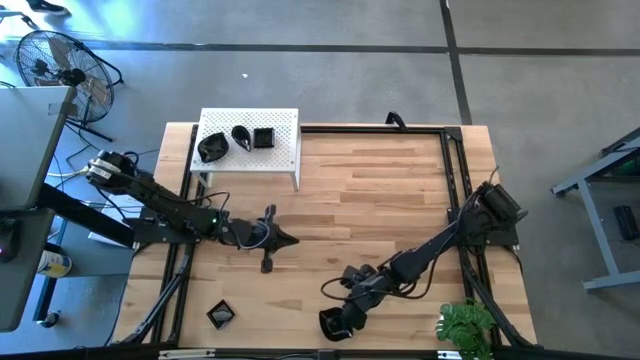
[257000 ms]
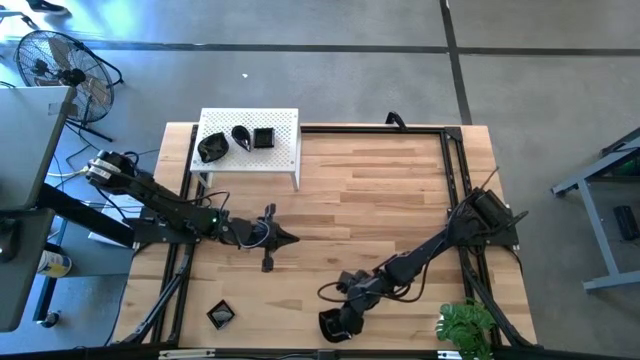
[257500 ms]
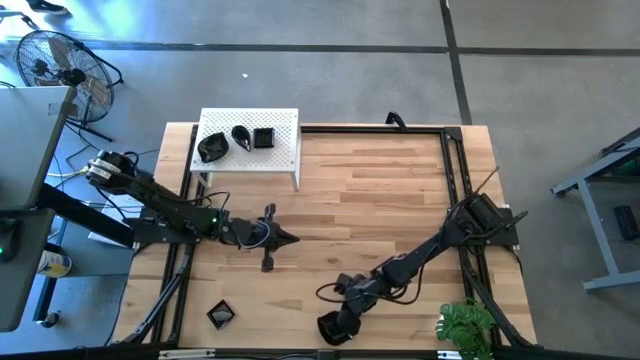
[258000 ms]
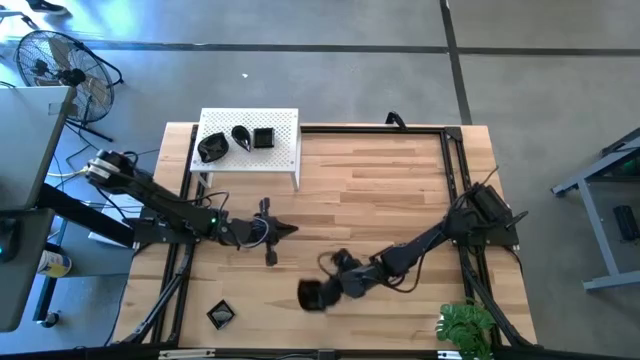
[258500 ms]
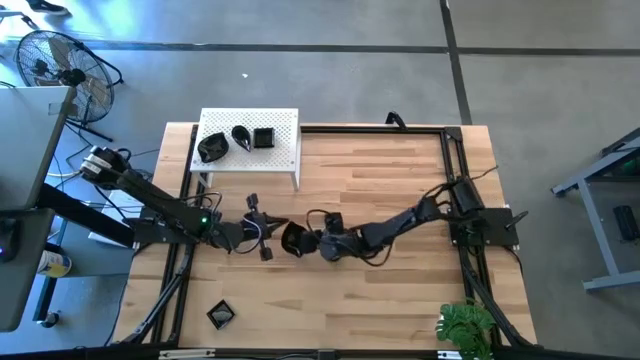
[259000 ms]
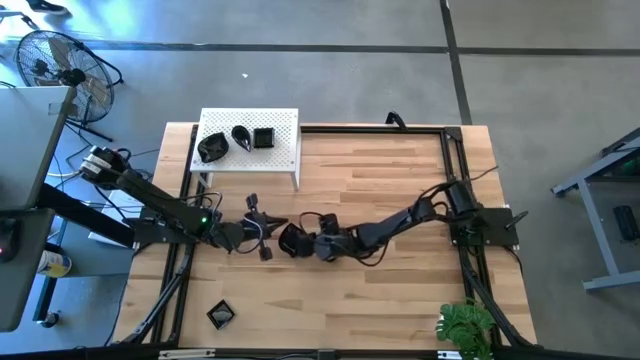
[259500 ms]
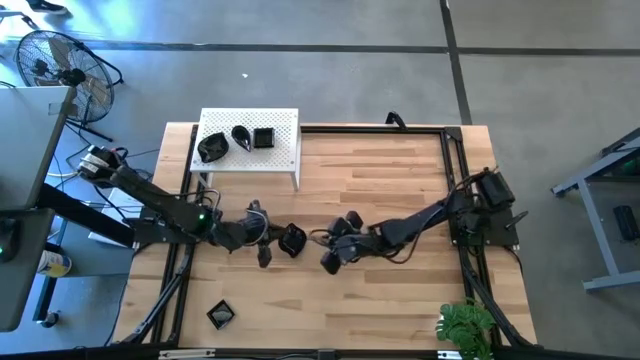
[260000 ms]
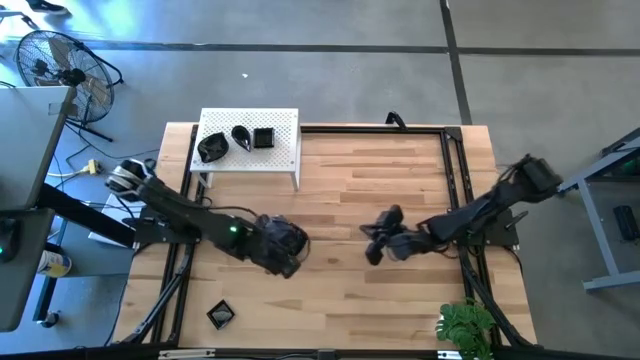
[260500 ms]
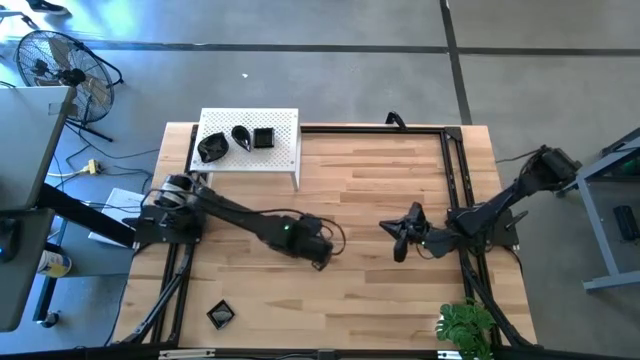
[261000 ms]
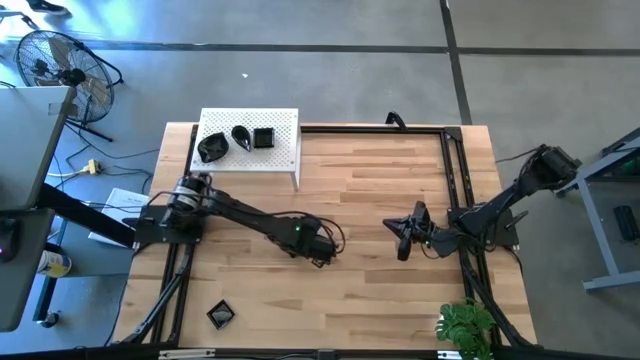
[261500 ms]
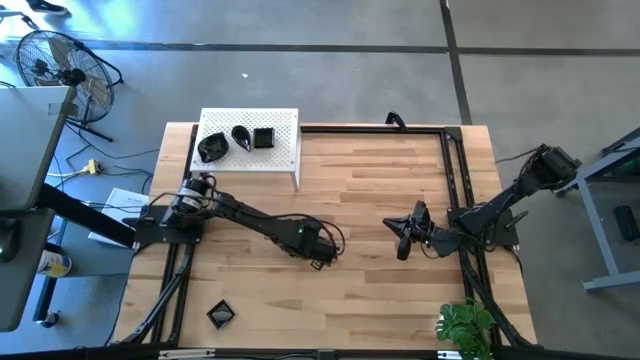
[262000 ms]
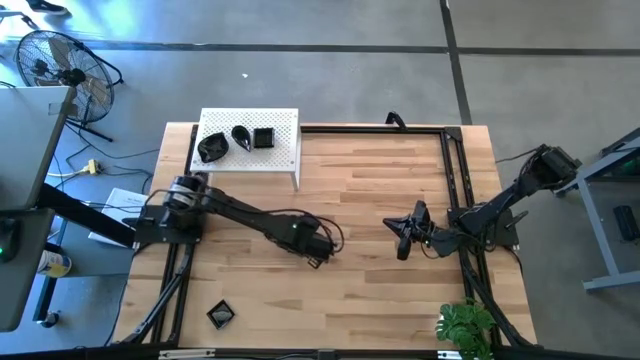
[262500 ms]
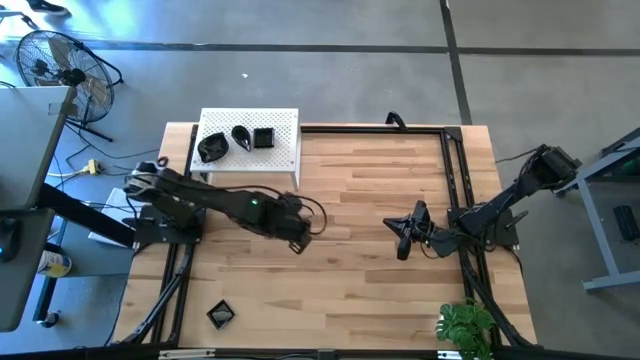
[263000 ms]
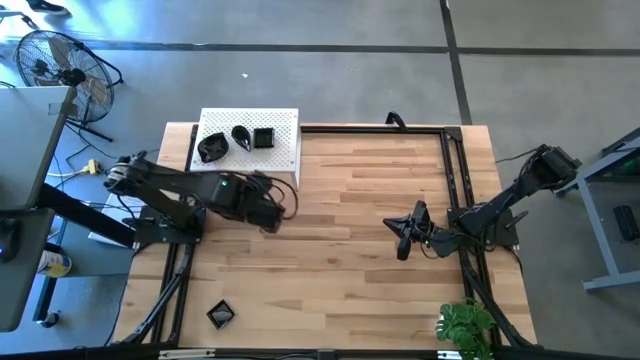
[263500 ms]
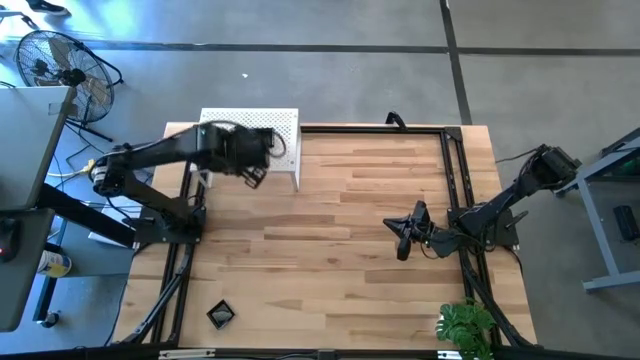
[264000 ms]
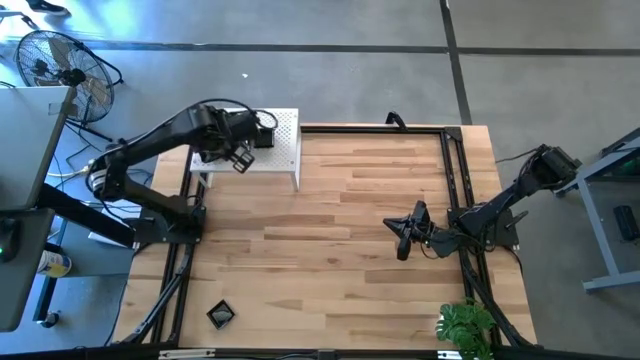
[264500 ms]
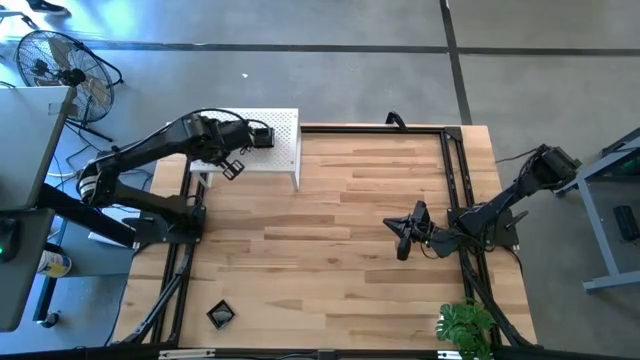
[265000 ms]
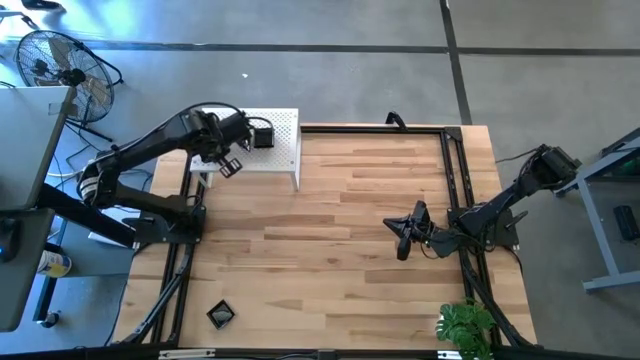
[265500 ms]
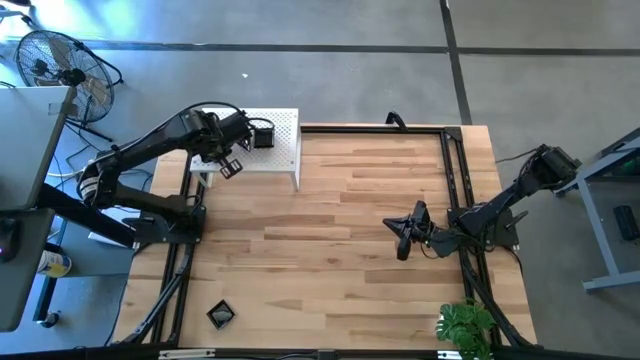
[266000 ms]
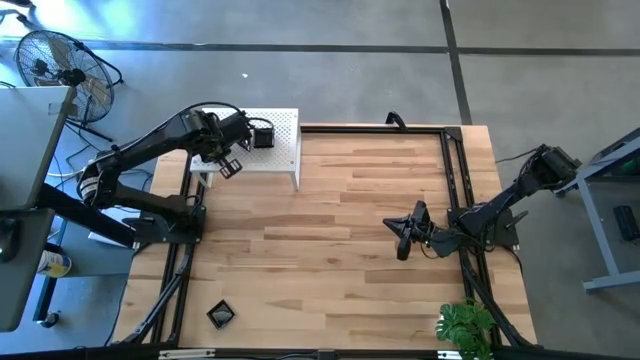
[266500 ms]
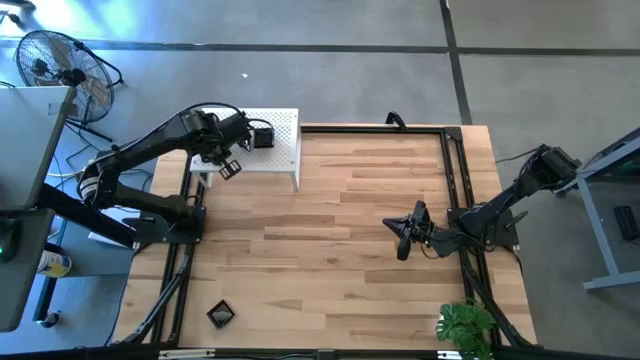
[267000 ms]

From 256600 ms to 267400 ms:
Task: Pick & Place Mini shaped plates
Stack the black leaf shaped plate on top of the stacked black leaf shaped plates on the shelf

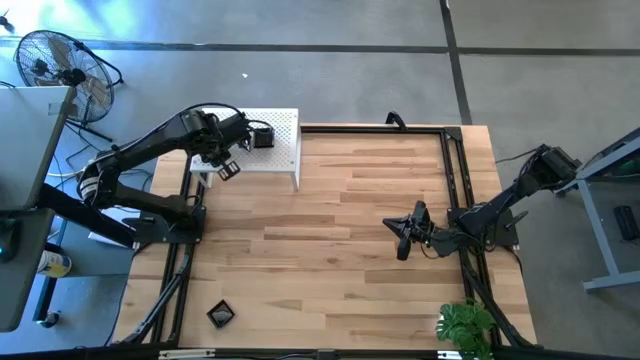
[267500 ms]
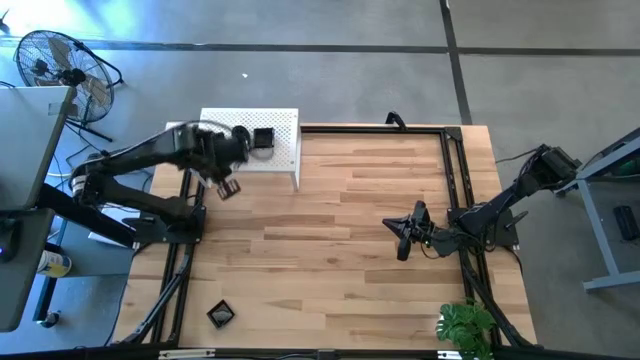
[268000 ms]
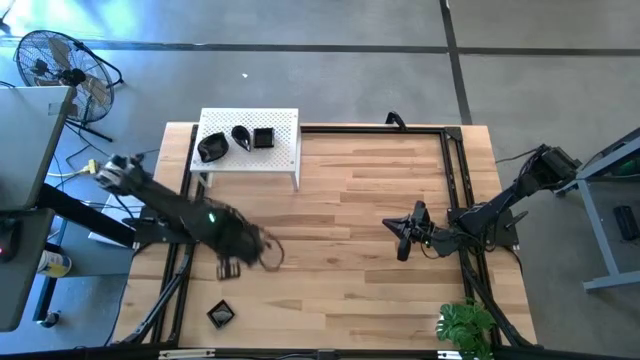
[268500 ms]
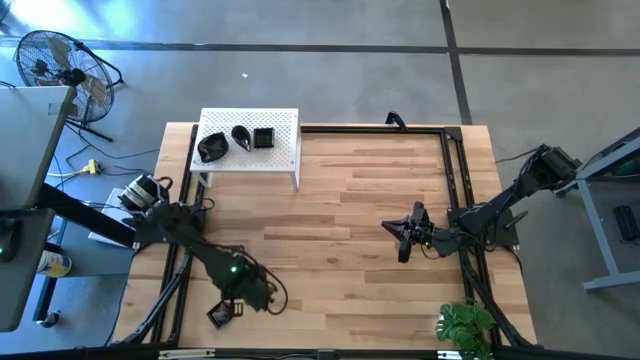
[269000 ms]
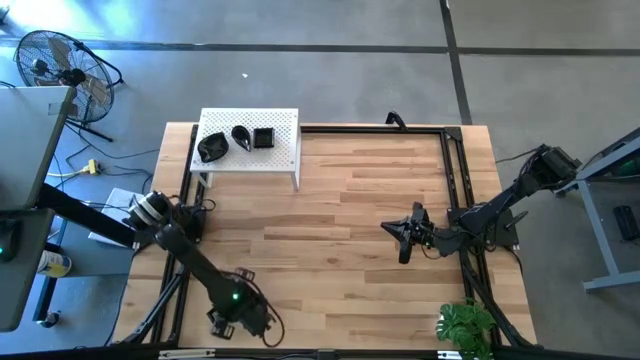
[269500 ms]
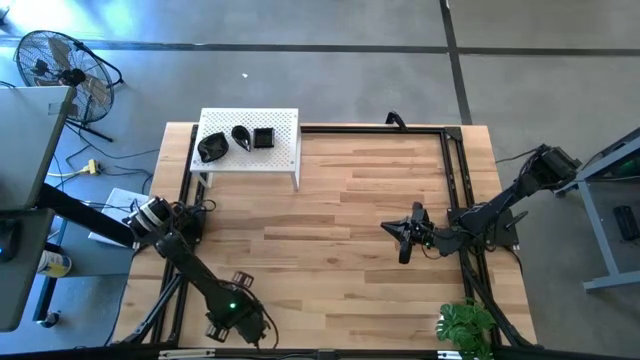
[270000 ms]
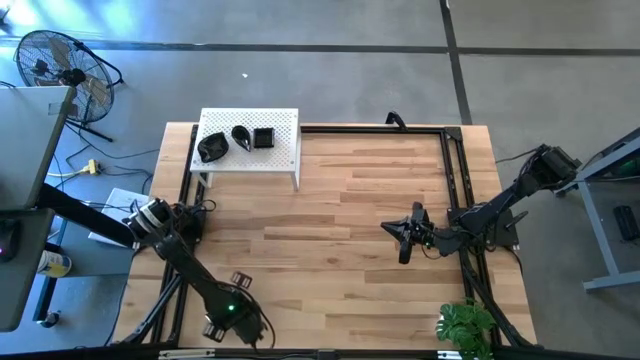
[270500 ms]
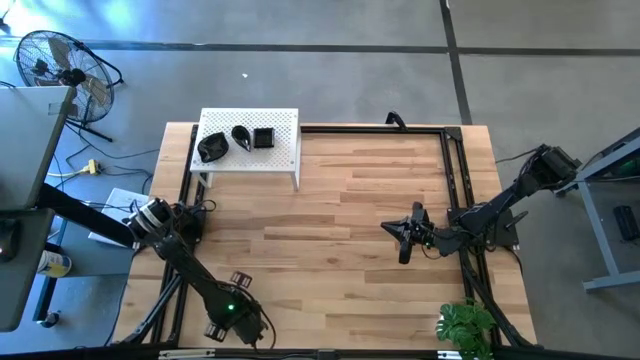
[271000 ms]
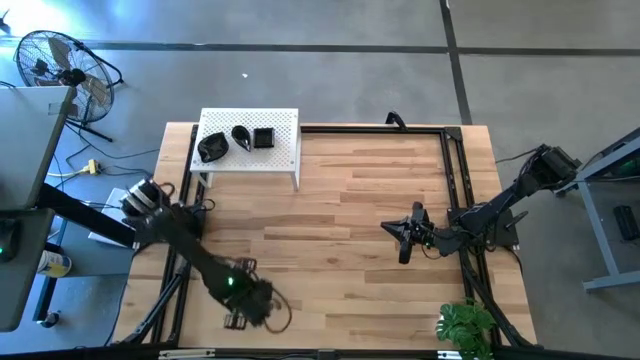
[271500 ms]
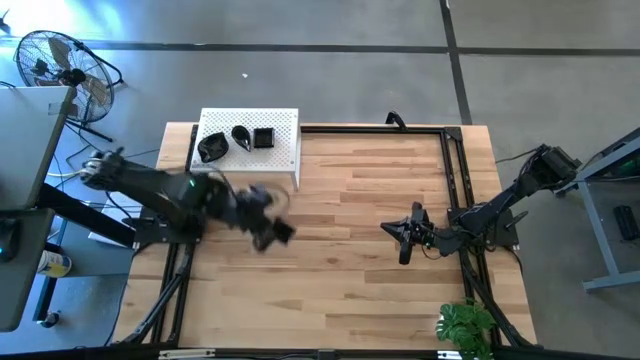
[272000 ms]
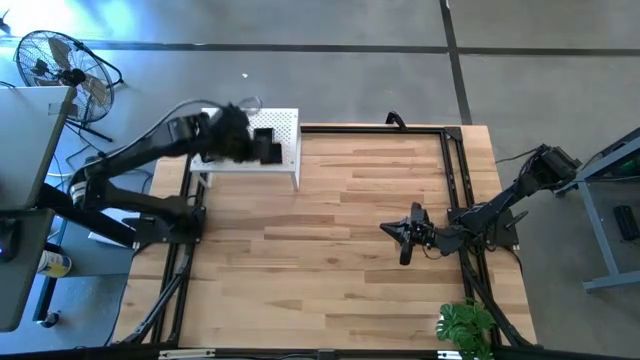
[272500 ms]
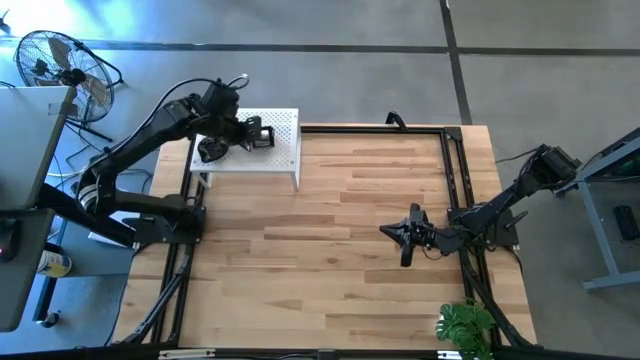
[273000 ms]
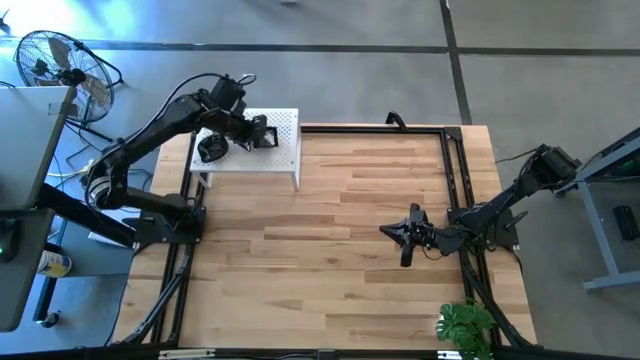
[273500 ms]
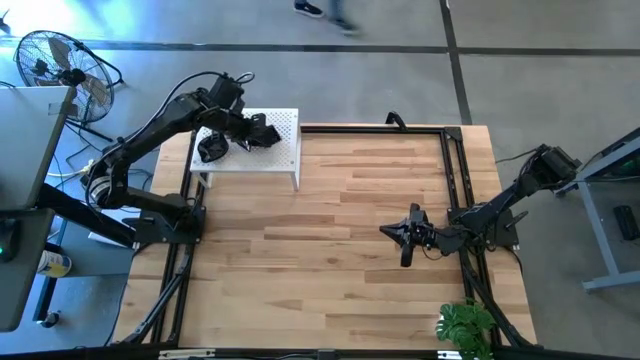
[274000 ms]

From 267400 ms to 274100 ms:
Stack the black square plate on the top of the stacked black square plates on the shelf

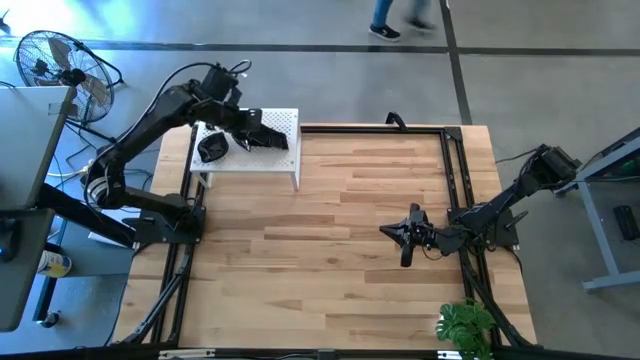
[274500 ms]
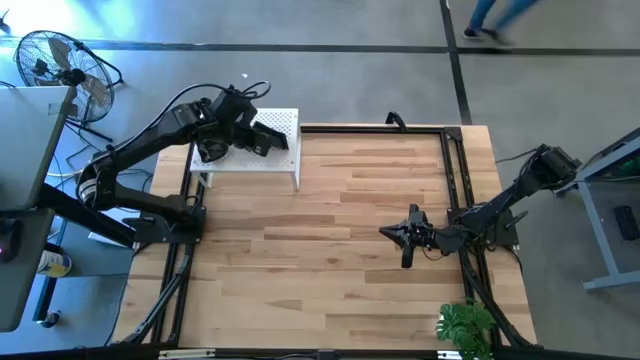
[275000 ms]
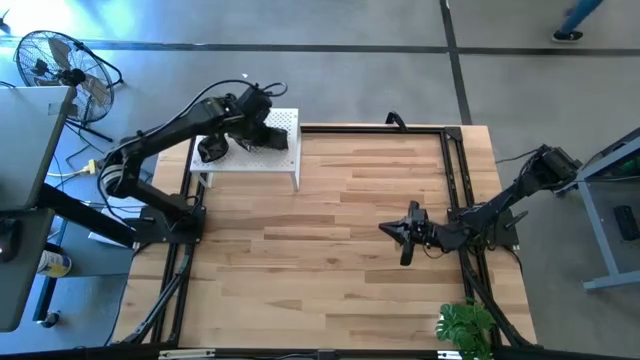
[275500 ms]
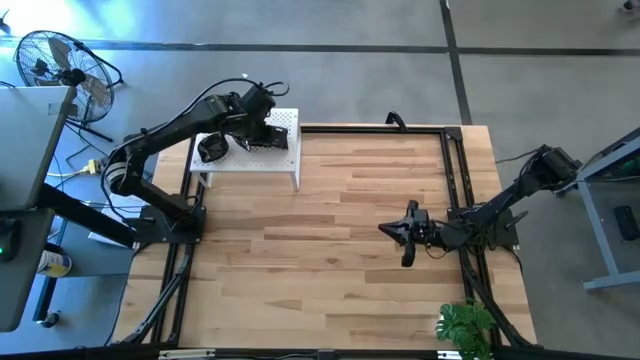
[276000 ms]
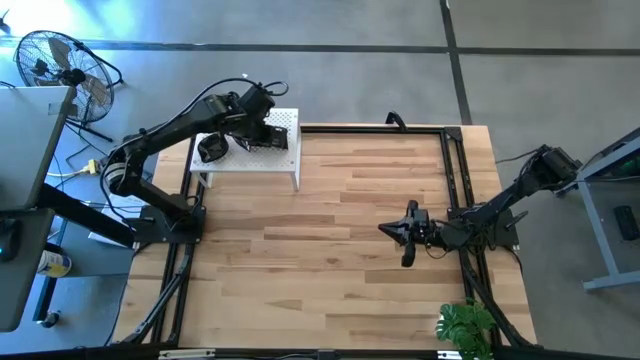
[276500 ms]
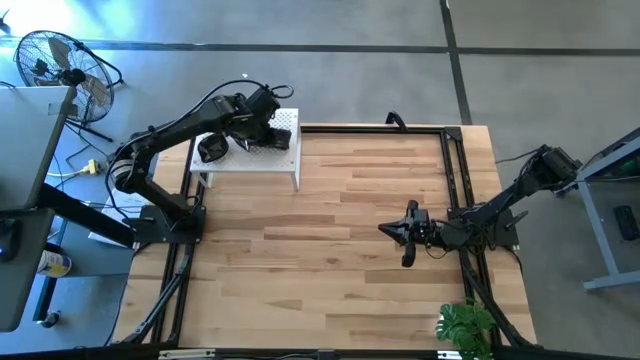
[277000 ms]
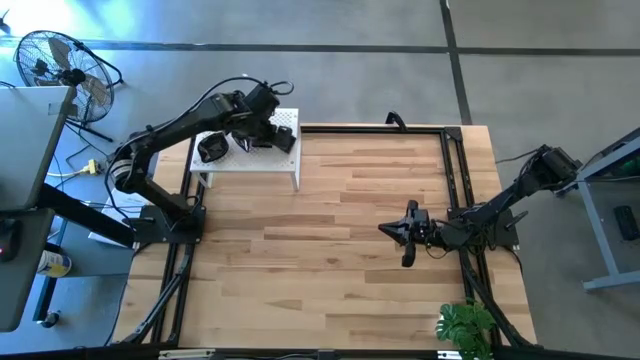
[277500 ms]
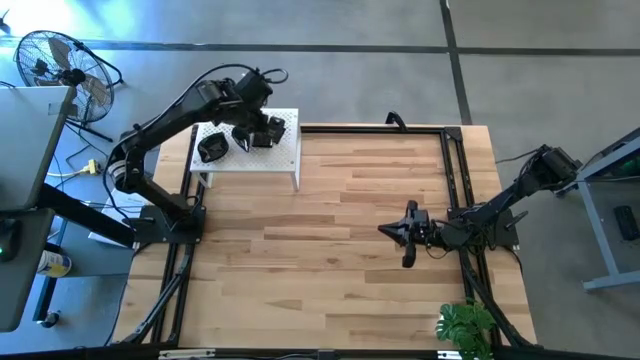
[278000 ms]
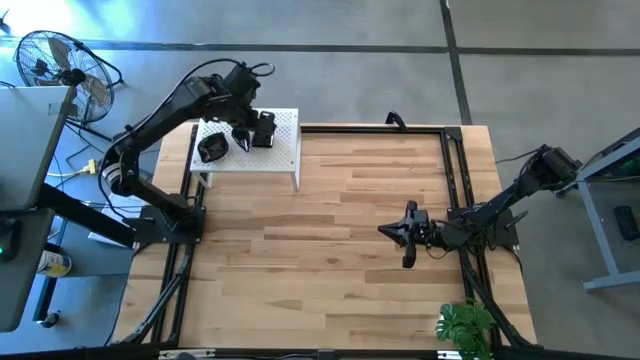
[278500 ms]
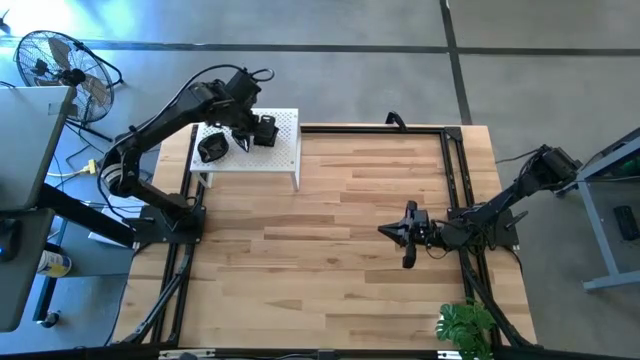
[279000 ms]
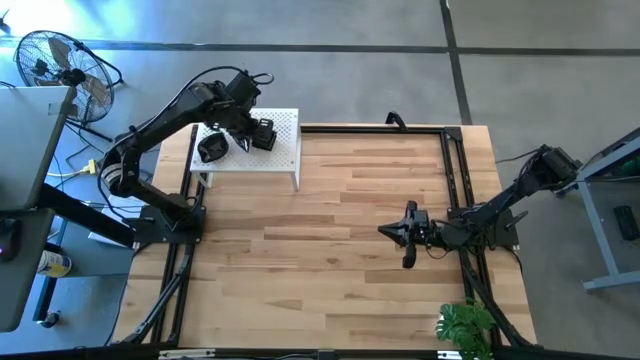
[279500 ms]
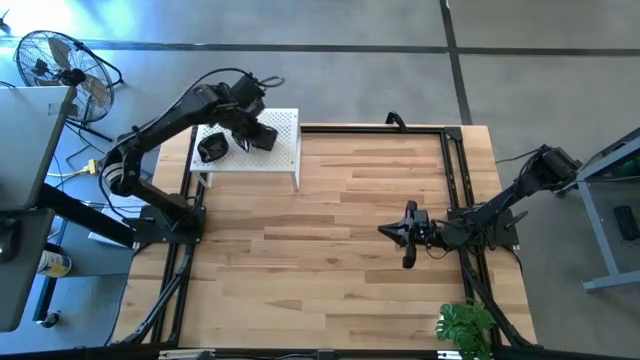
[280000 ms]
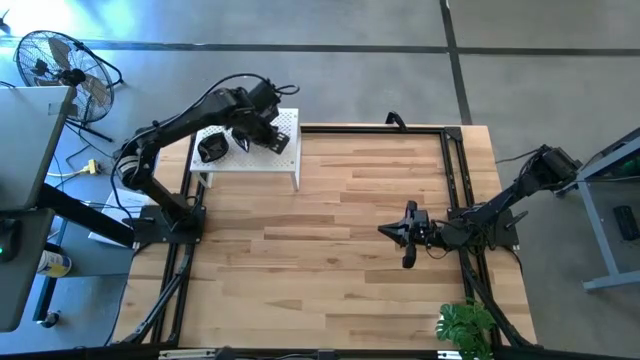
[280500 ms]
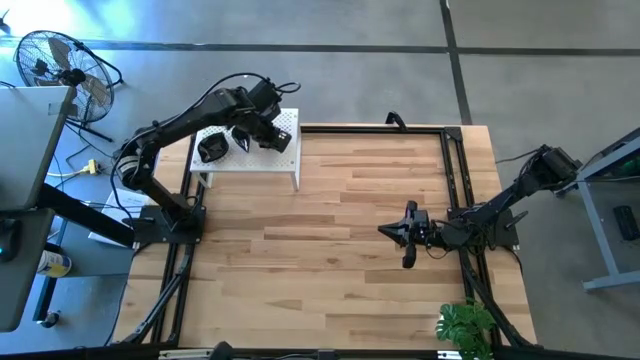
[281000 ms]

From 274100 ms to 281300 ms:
Stack the black square plate on the top of the stacked black square plates on the shelf
